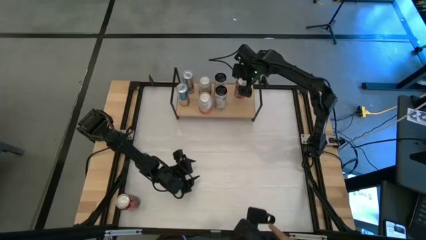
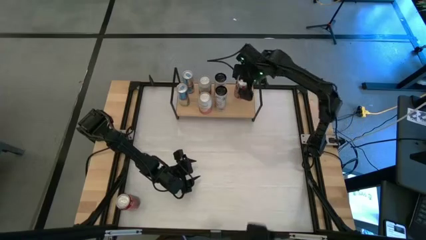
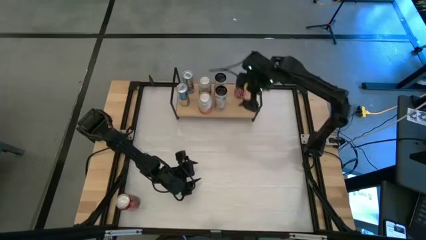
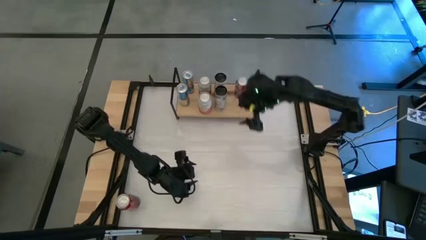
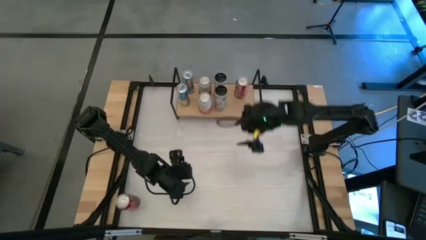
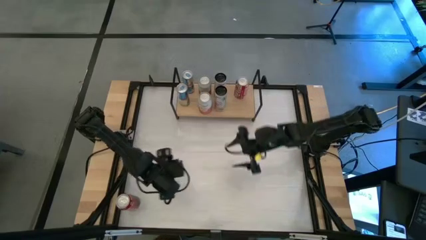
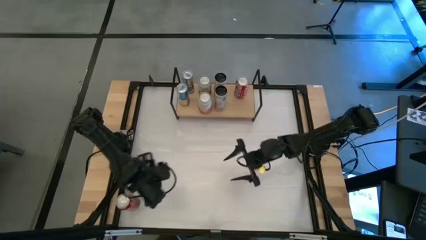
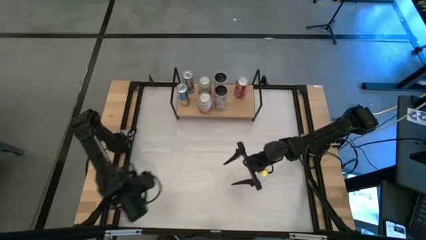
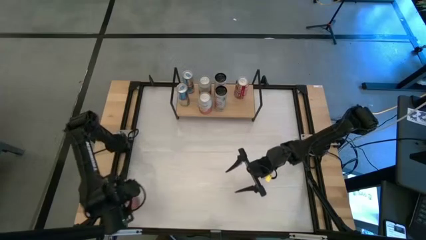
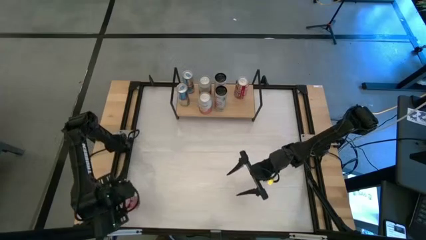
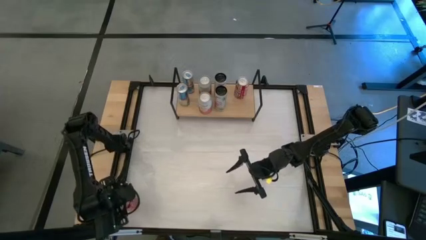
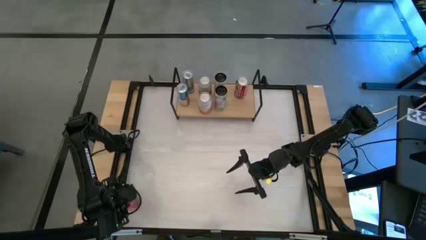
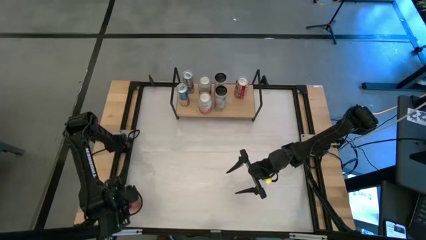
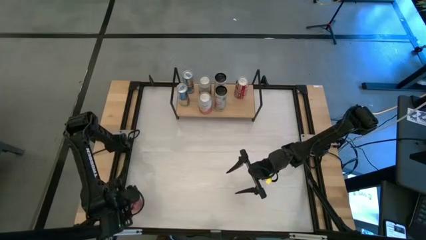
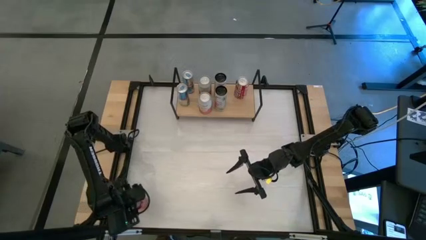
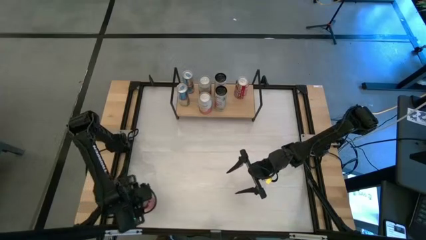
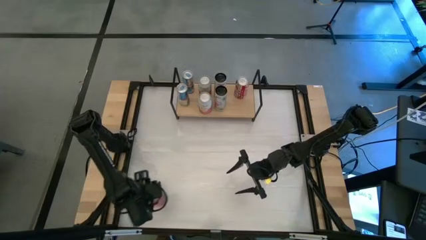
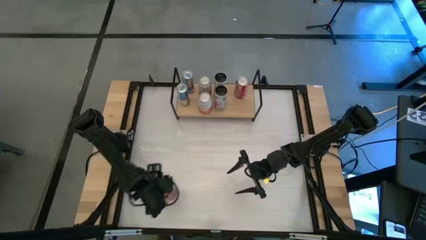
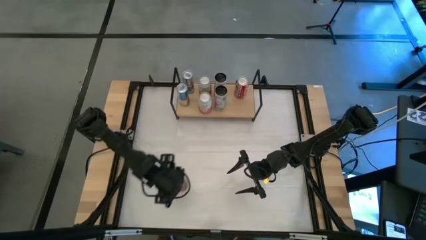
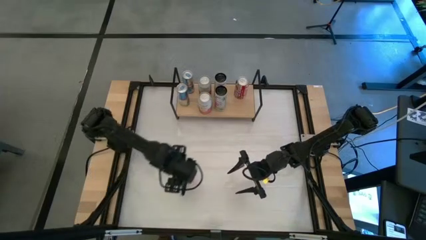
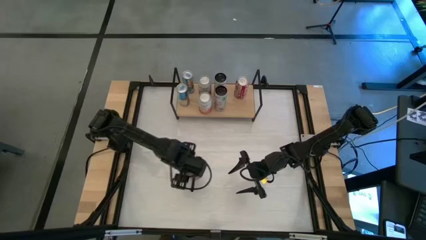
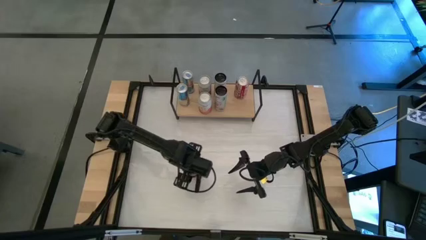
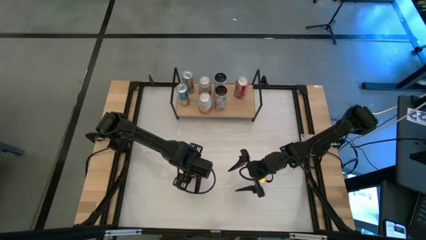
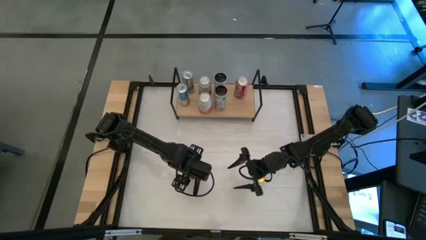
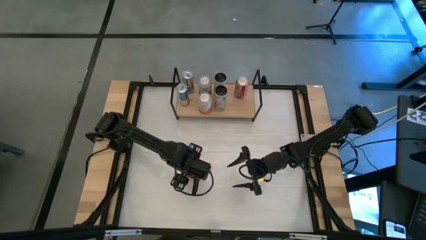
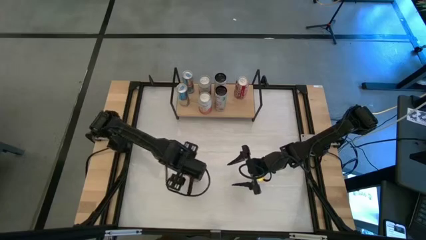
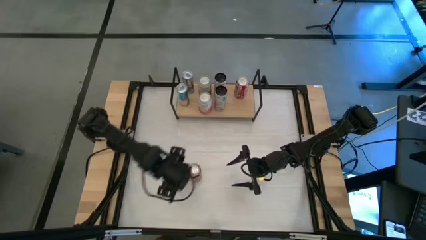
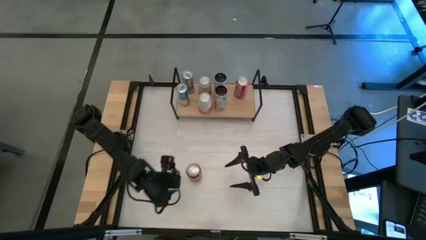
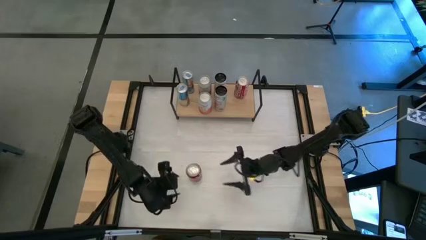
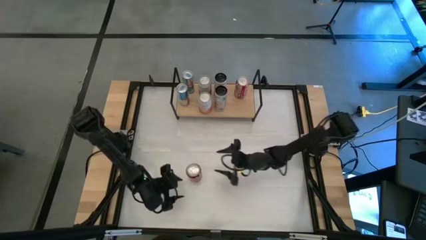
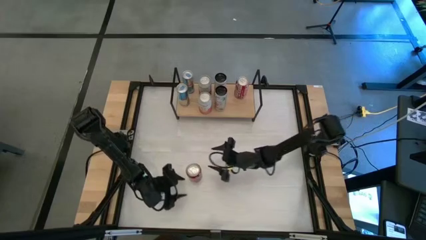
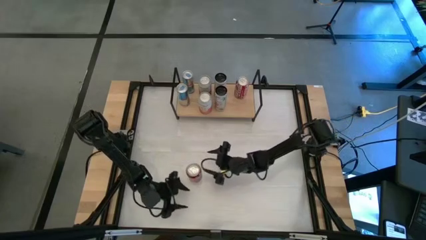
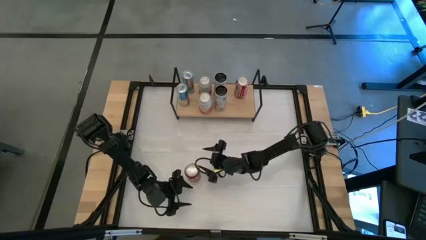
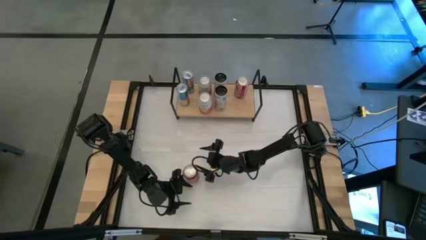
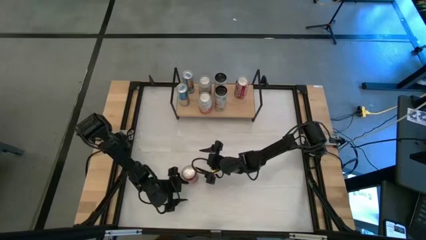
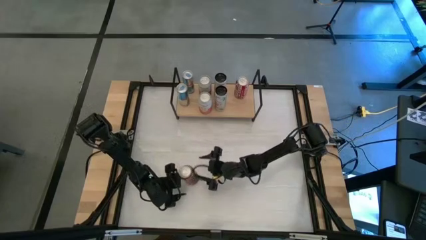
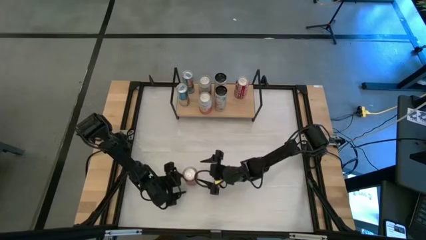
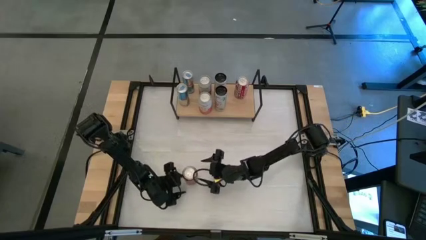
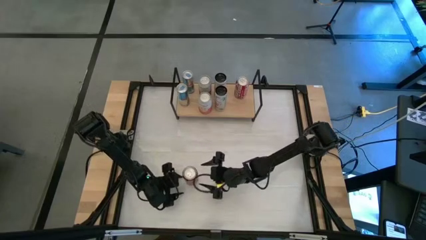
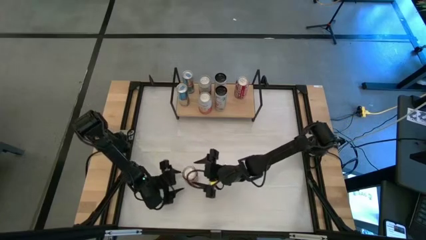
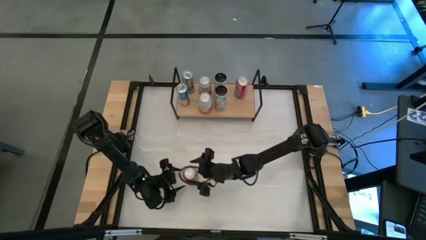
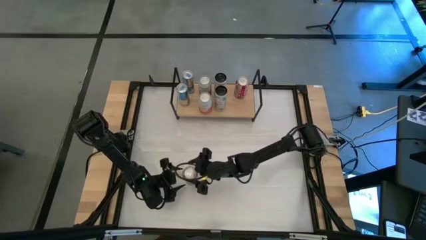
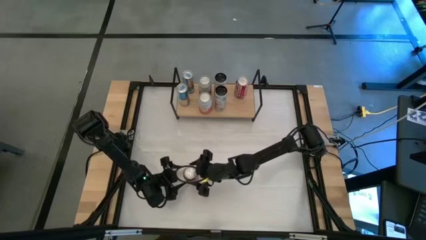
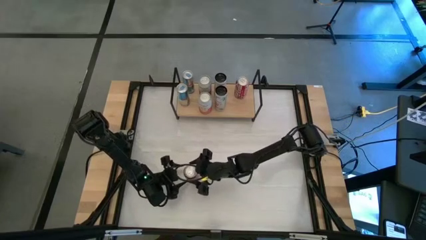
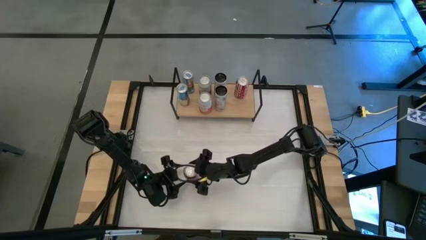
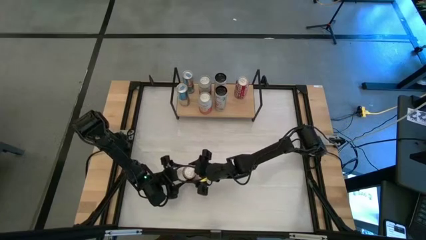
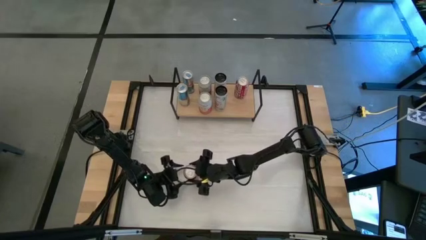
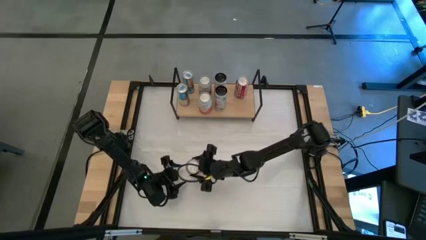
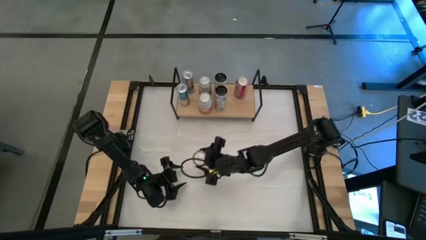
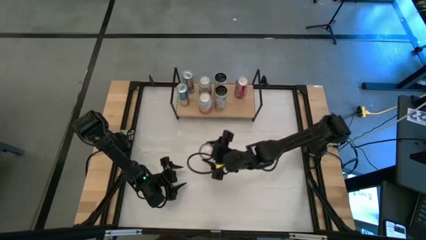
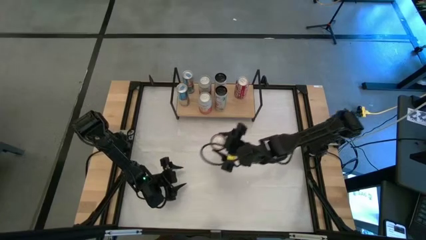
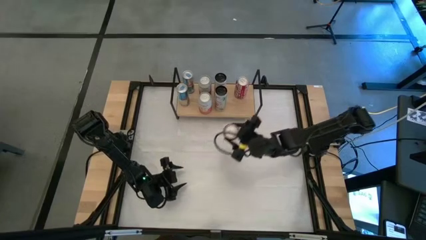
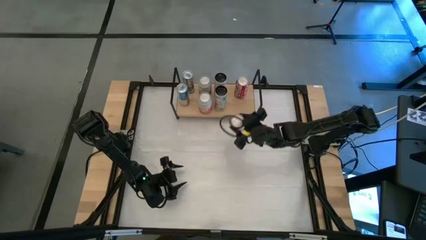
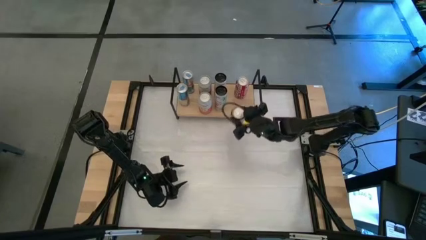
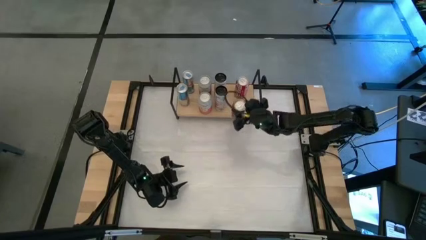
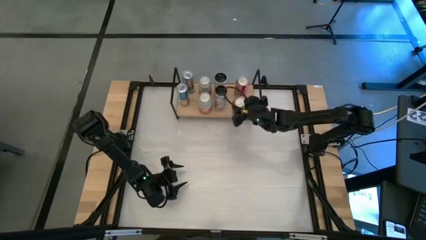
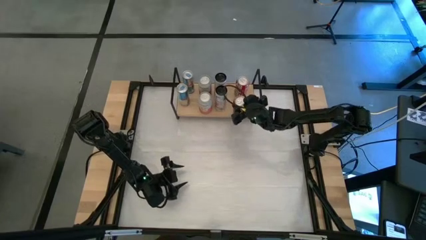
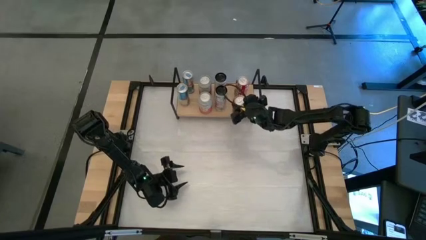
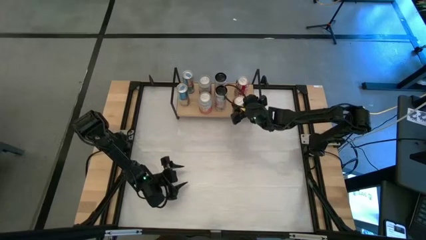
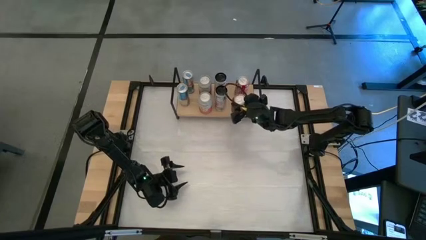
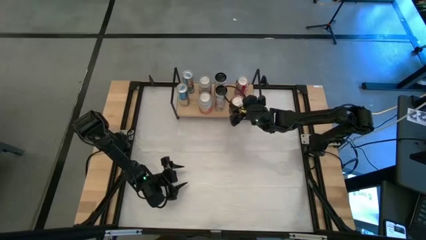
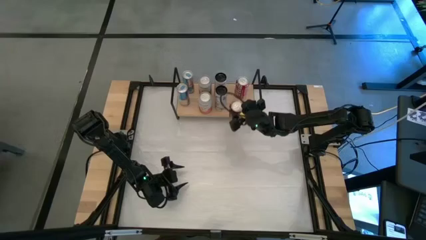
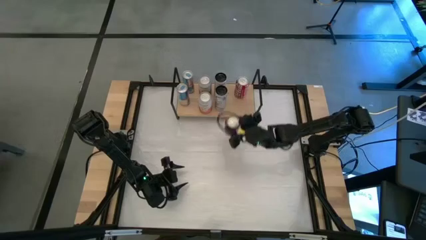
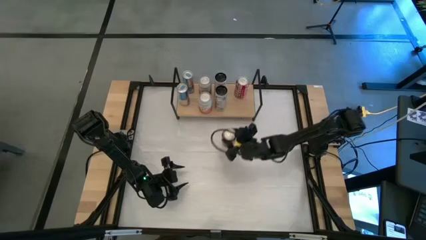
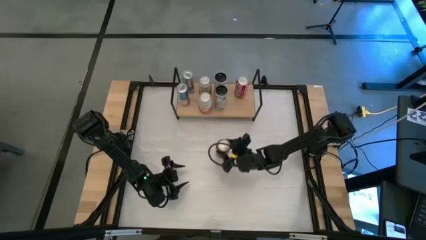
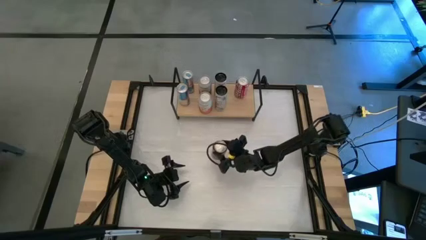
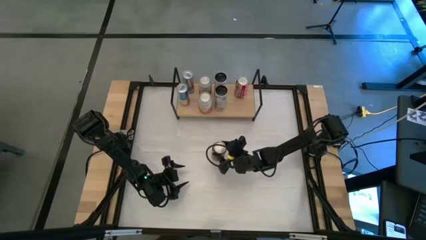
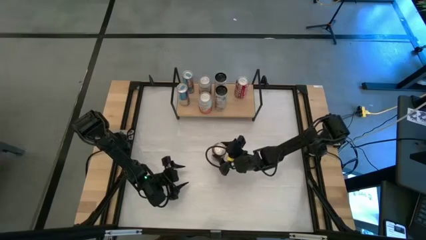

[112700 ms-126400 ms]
Task: Place canned beverage on shelf
Put the red soda can aligned with the other red white soda can on the shelf

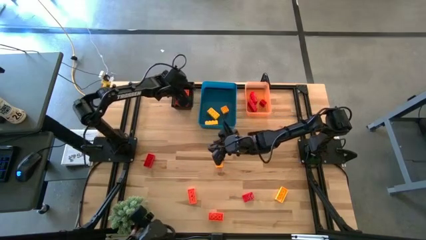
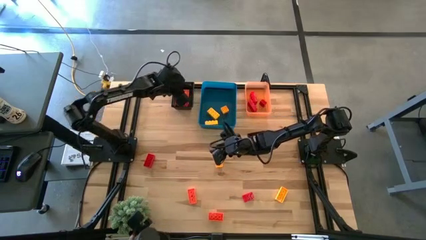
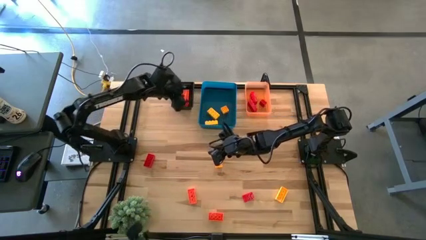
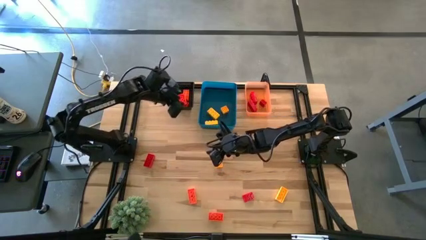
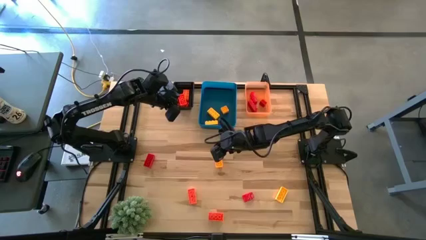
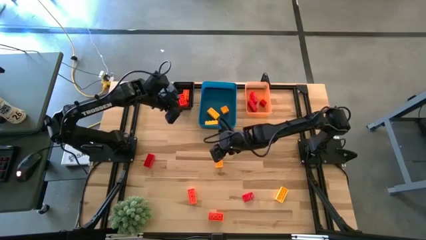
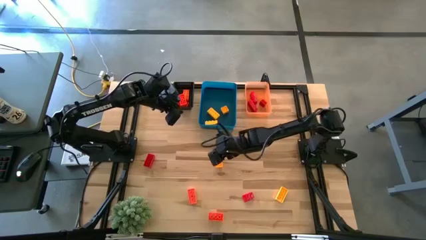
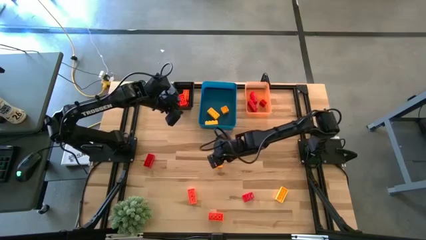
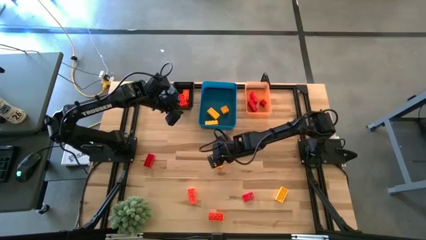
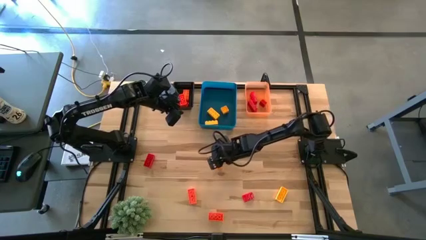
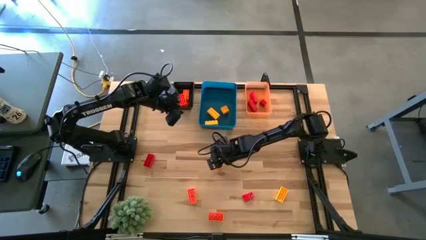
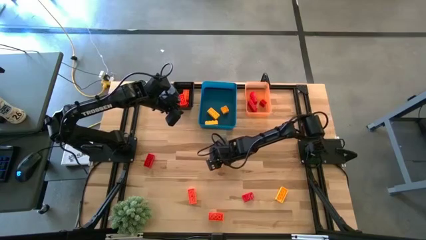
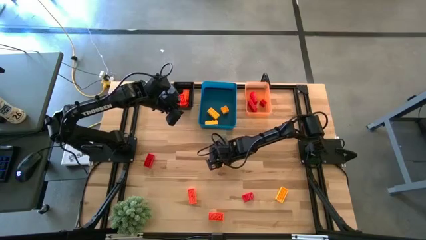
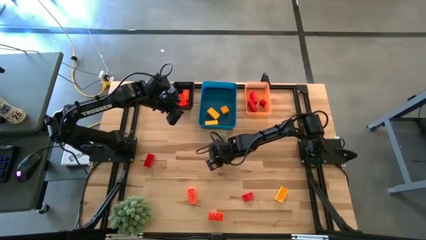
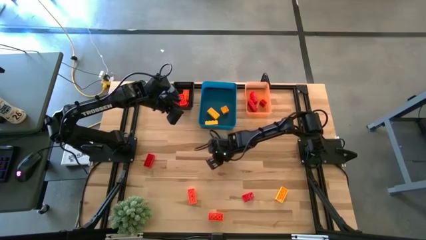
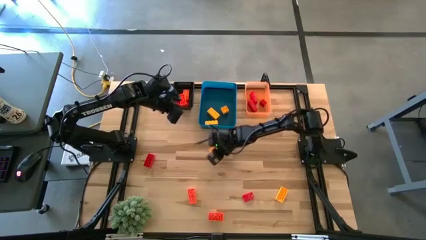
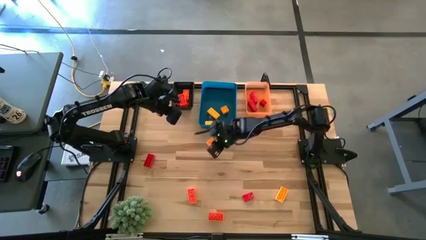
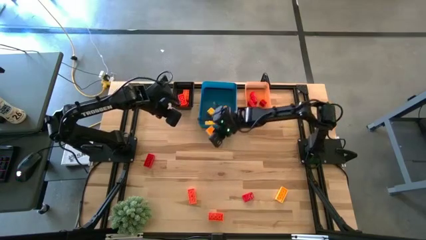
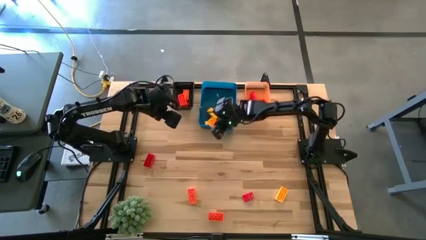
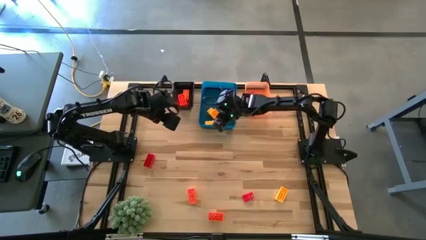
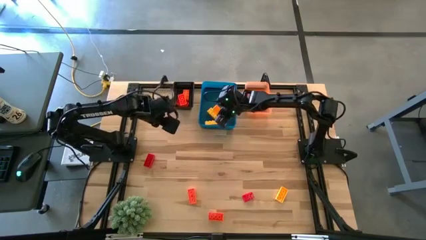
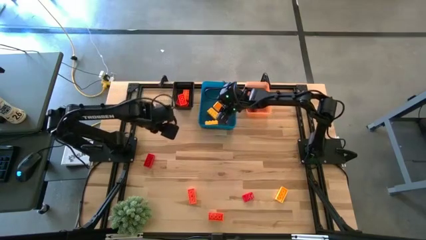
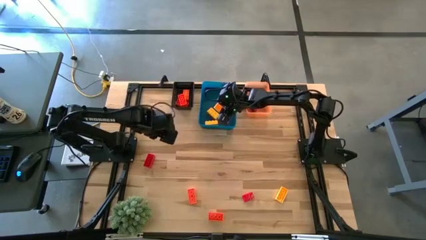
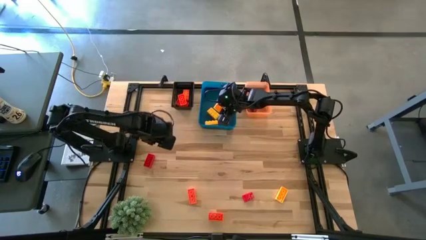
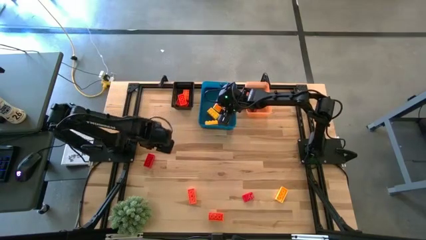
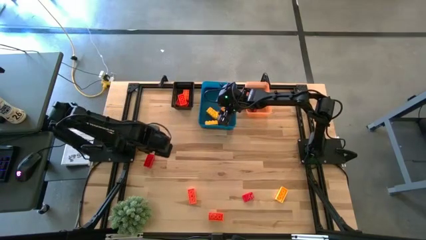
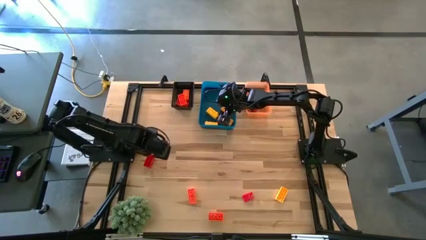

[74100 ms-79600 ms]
Task: Sort & place blocks by color
Put the yellow game piece into the blue bin
